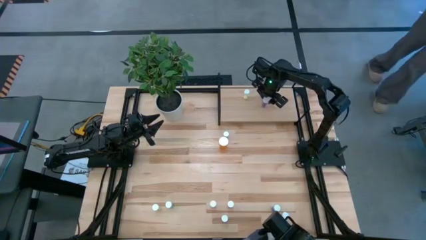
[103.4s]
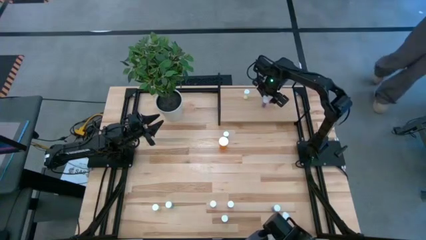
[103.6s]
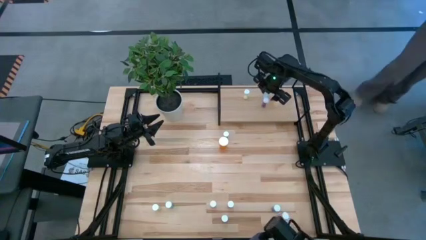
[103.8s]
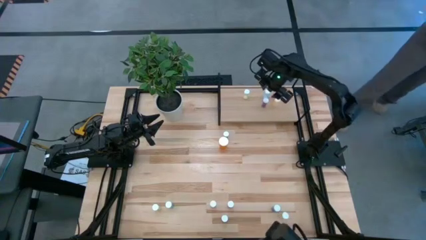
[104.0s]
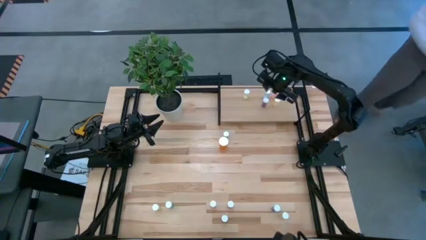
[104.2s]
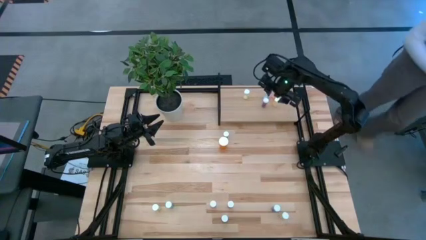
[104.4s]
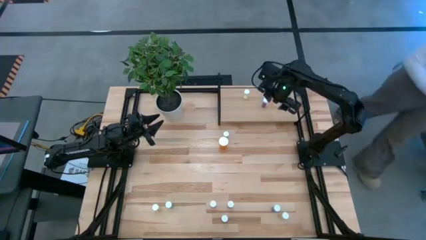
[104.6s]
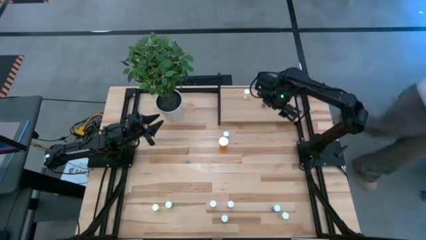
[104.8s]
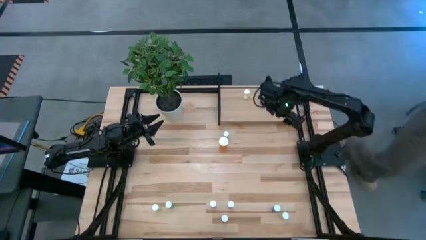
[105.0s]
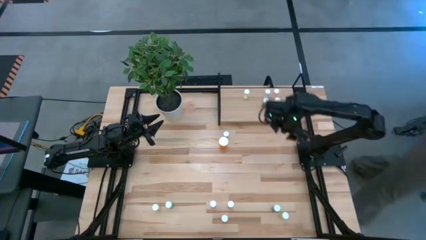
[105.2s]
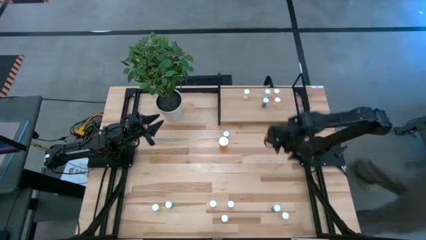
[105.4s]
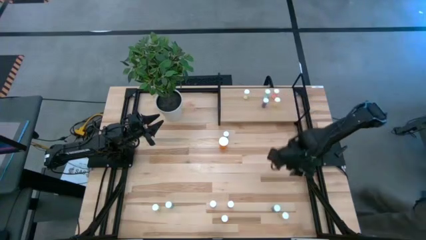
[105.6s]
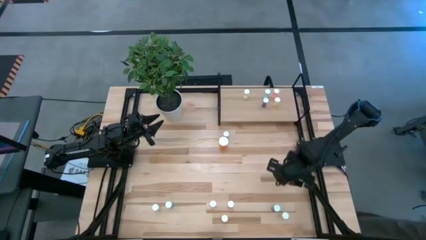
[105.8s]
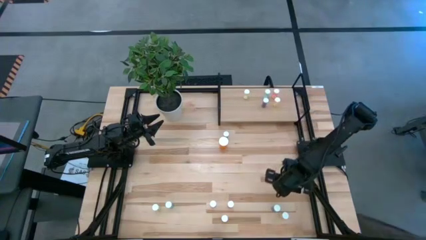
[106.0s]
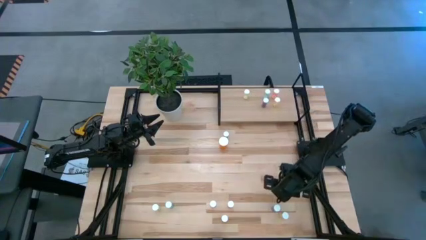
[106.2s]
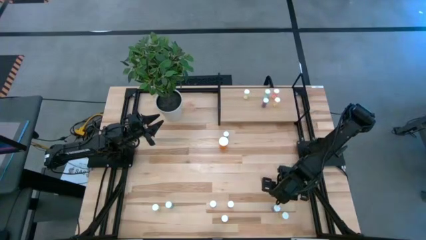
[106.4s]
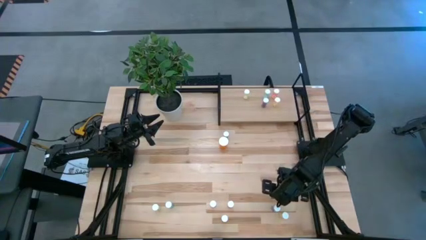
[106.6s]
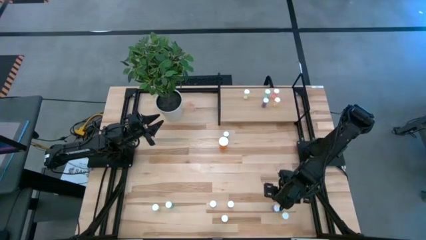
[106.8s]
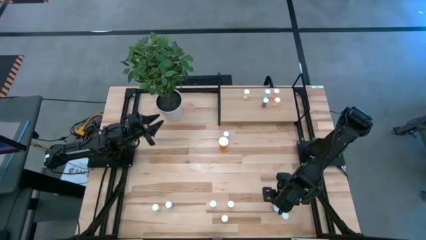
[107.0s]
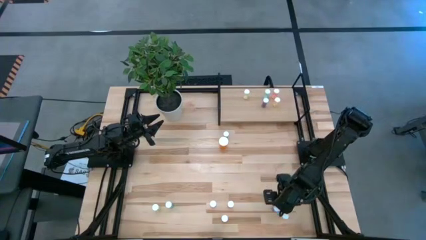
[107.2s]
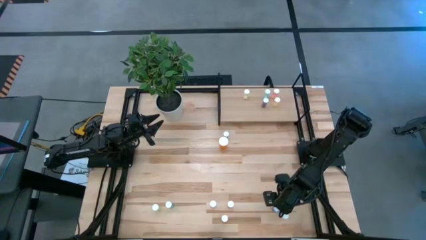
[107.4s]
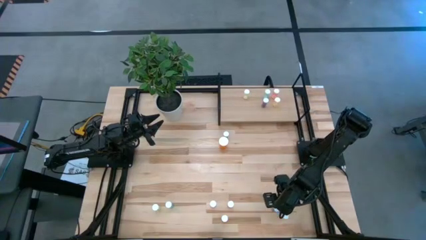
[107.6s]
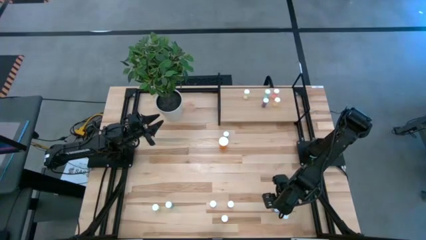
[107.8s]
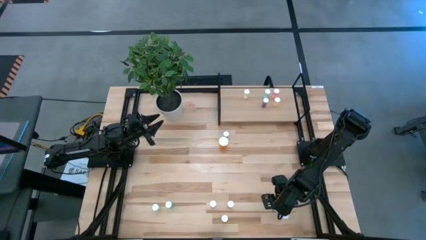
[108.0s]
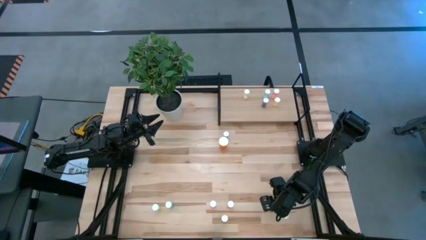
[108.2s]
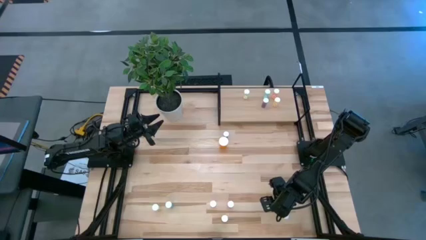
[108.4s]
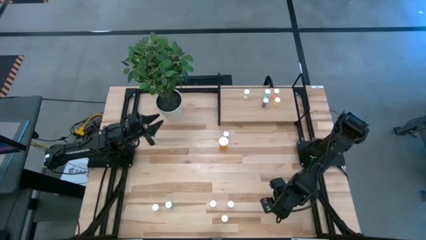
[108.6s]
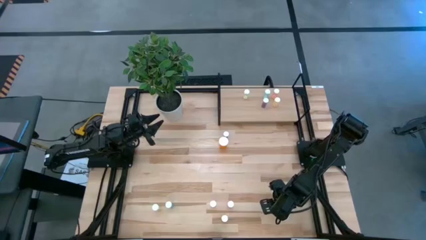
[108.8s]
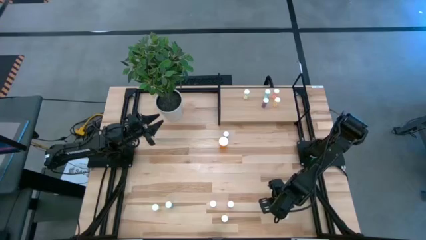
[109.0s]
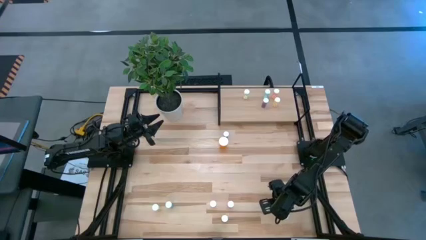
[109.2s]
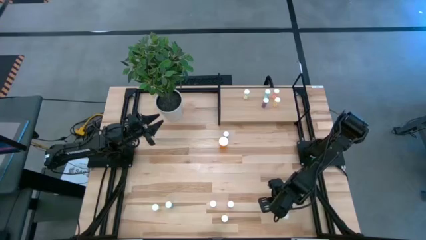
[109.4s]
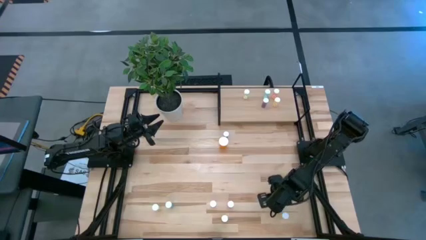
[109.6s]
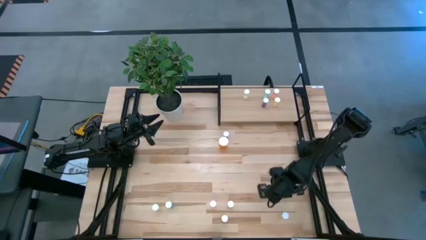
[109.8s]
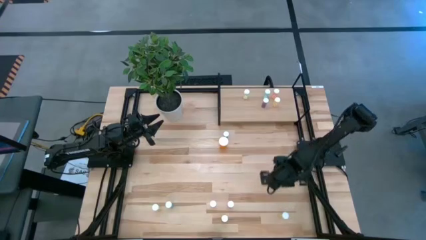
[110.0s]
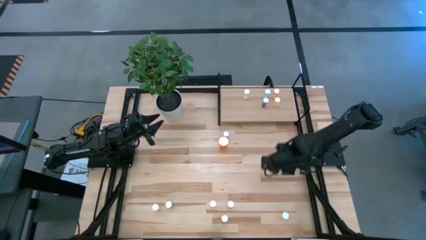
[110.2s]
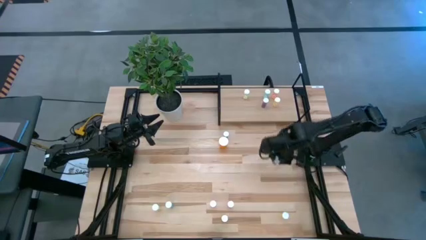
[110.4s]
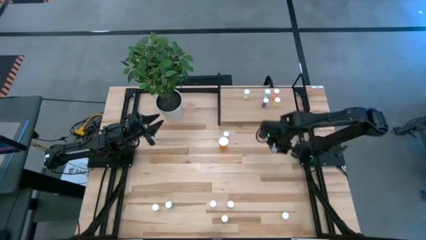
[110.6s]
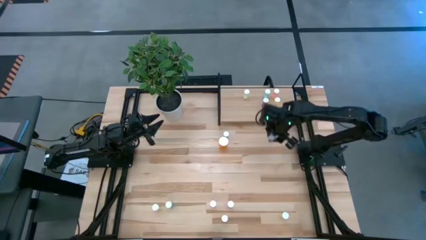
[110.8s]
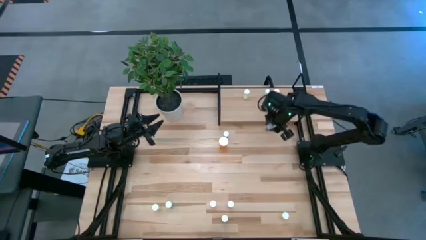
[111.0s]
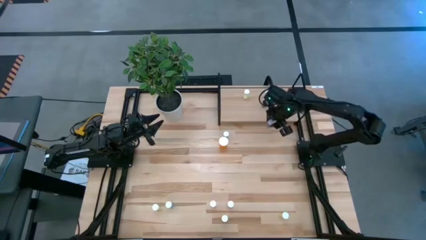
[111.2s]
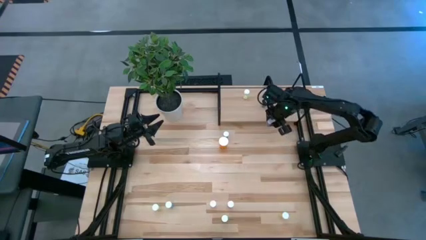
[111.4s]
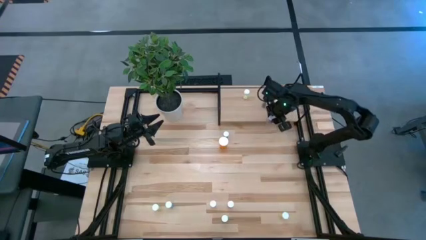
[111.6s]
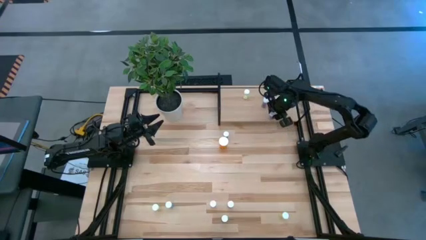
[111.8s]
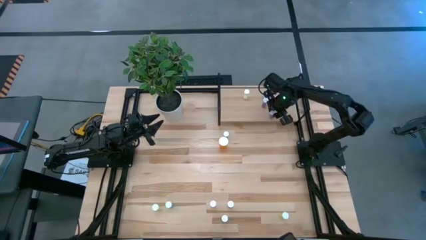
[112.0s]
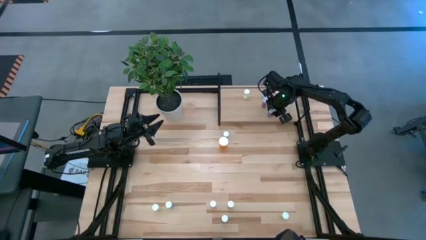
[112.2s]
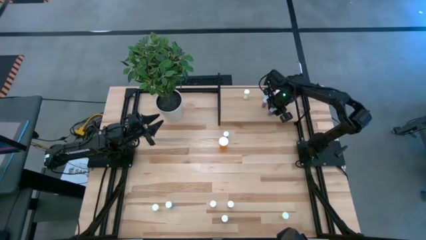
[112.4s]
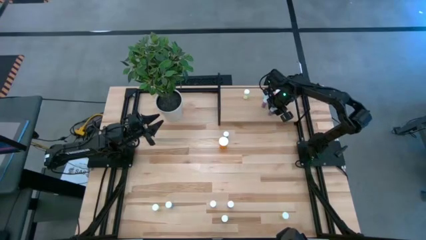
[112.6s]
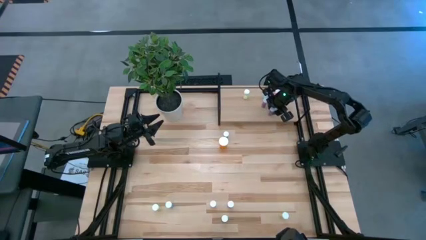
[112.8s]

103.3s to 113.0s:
Task: Pick and place medicine bottles onto shelf by color
Put the bottom right blue pill bottle on the shelf

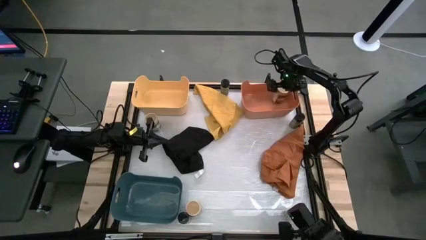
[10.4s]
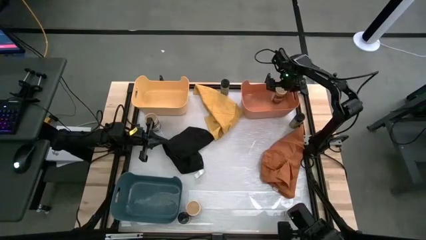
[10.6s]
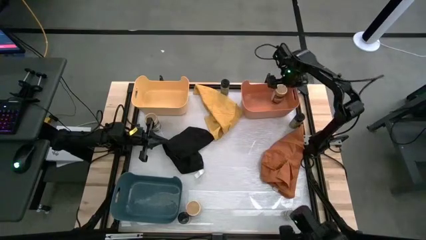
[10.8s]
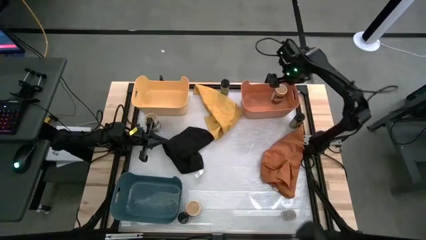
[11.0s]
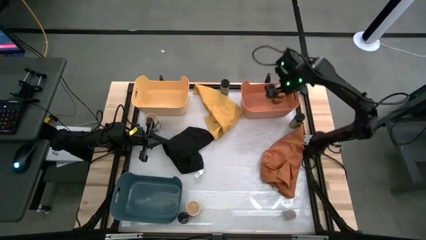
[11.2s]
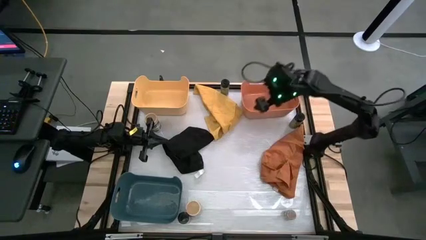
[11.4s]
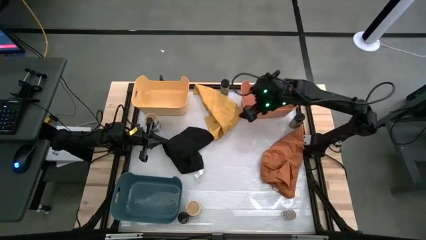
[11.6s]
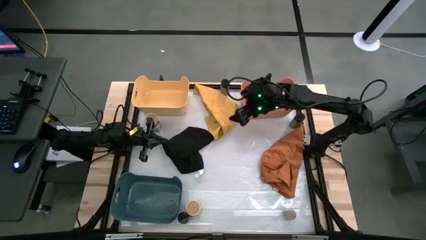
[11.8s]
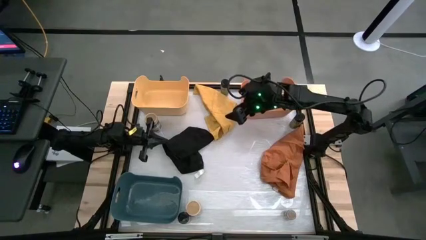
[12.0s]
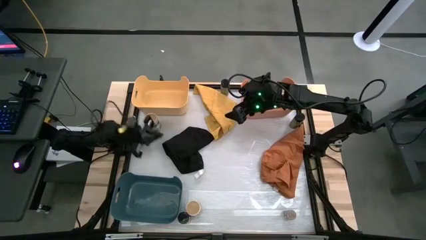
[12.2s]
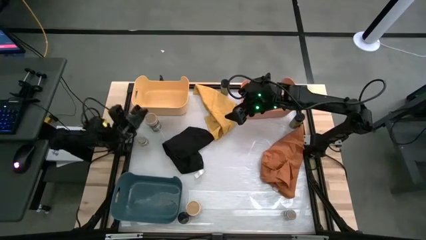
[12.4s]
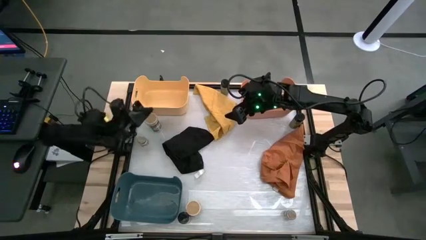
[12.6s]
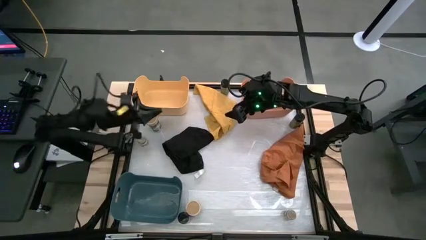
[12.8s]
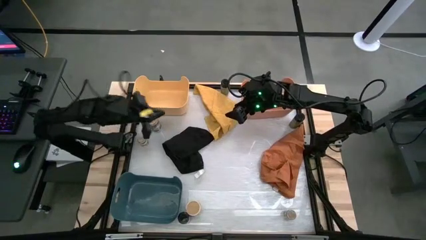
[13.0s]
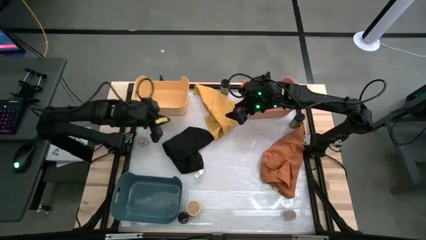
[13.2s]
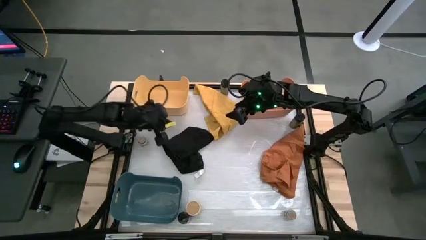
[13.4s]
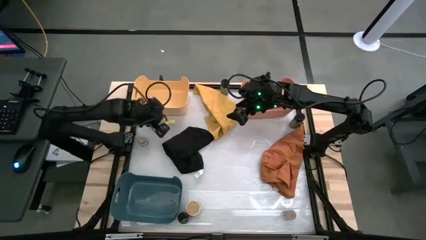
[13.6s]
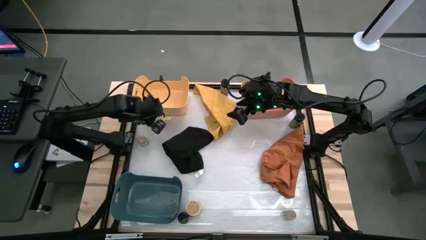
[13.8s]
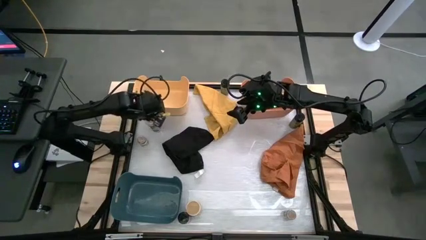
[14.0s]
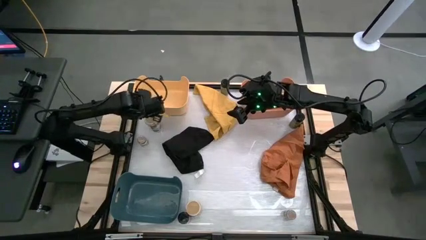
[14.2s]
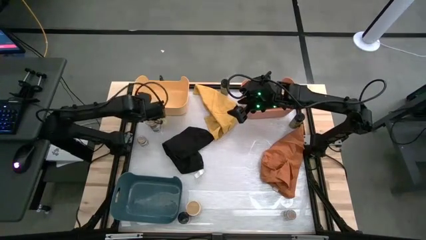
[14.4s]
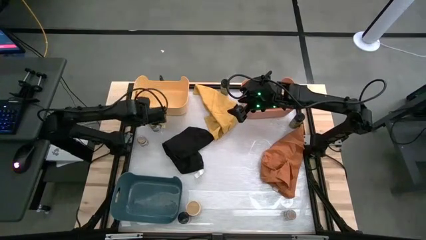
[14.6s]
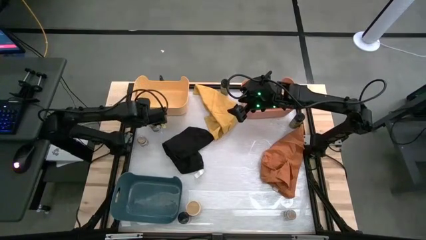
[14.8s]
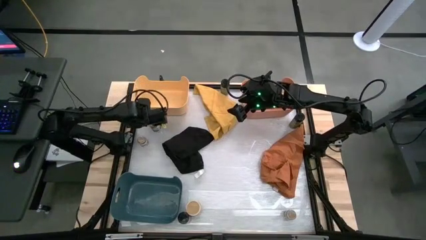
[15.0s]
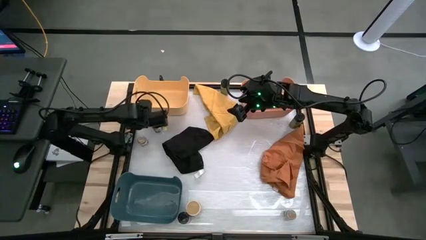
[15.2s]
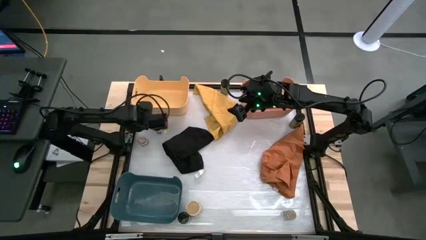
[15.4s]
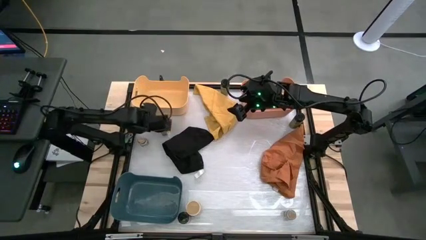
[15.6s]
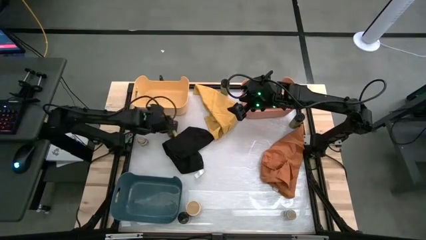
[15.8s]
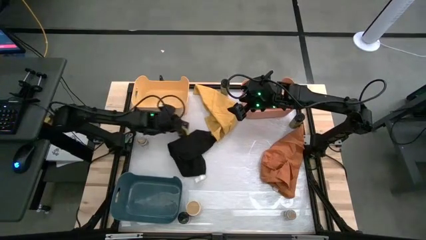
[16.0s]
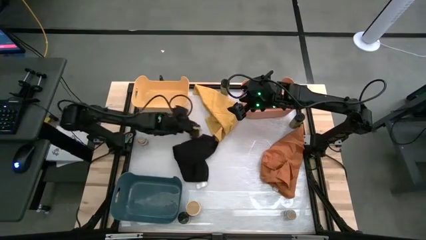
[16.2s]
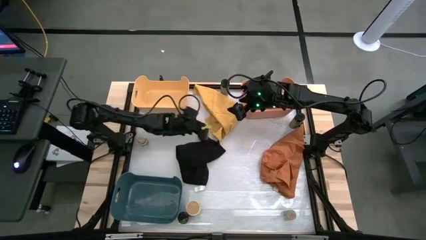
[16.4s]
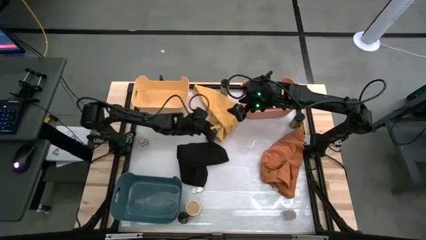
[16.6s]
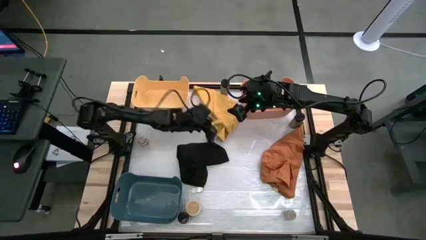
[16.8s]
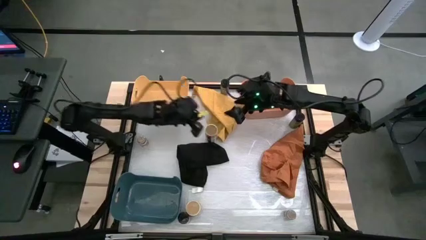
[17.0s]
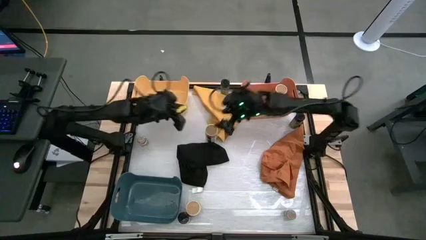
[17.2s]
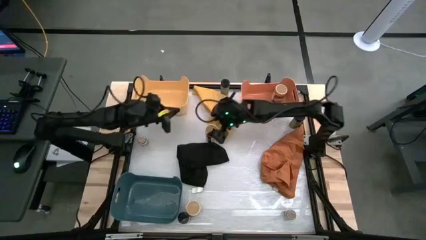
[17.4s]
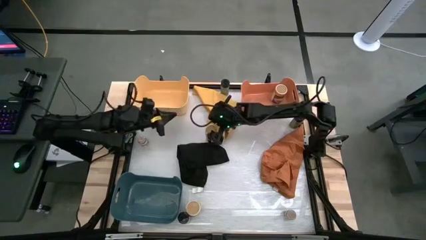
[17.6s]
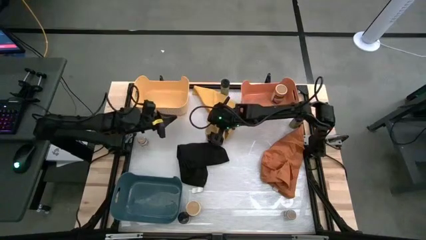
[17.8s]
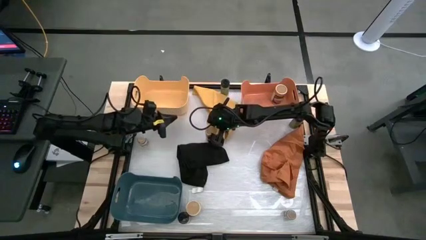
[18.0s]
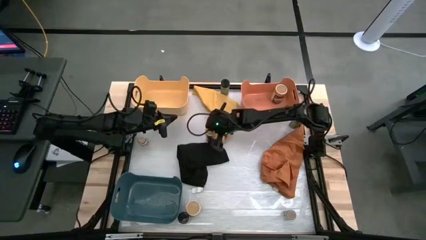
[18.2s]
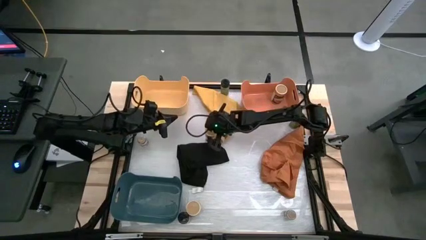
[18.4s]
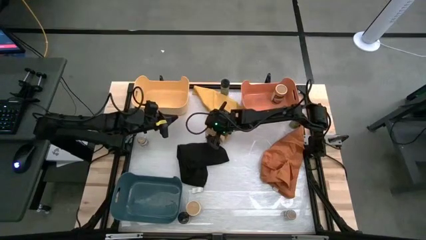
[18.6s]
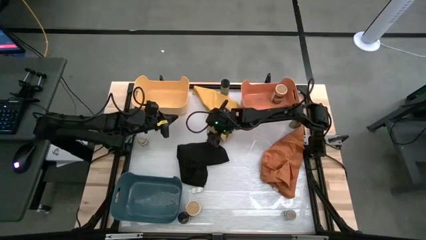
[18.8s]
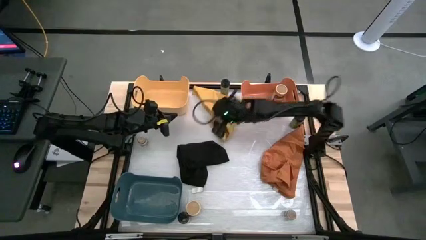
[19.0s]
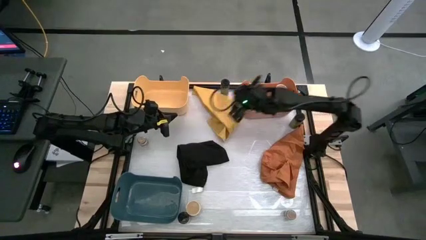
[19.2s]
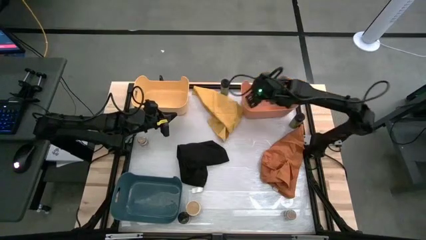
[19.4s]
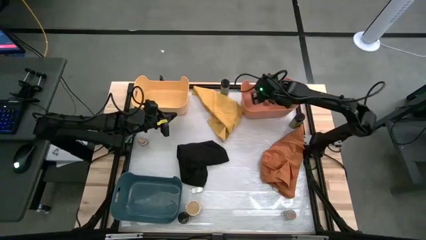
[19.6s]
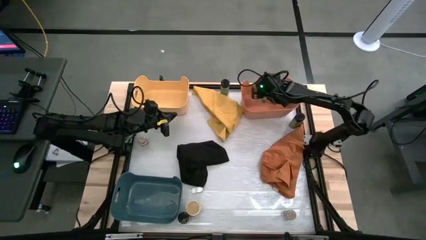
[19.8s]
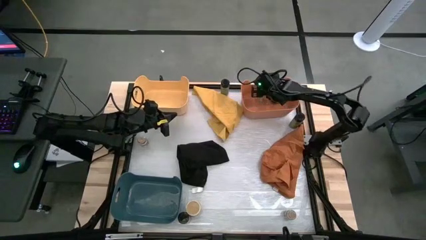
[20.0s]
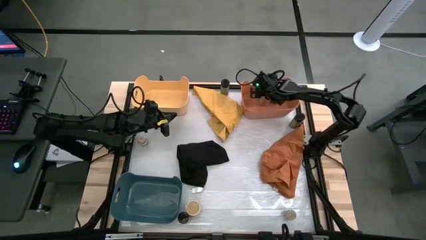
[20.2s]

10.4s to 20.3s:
Task: Sort spices by type
Put the top gold seasoning bottle into the orange bin
